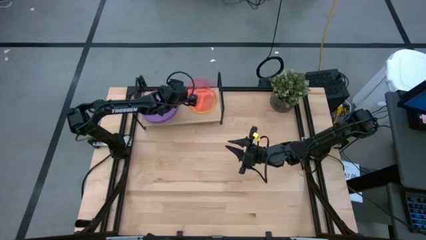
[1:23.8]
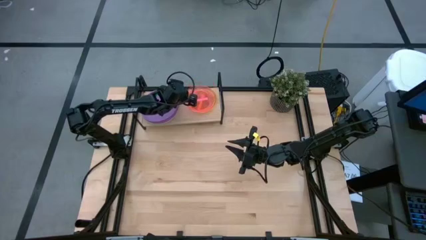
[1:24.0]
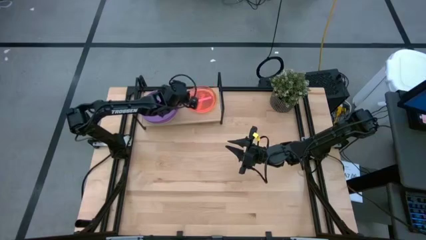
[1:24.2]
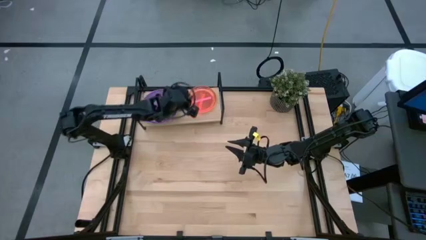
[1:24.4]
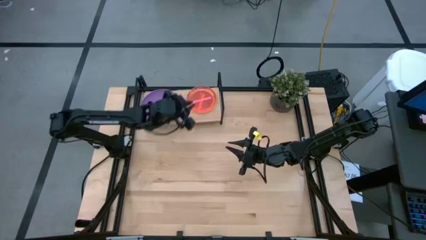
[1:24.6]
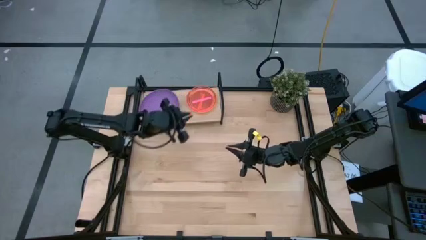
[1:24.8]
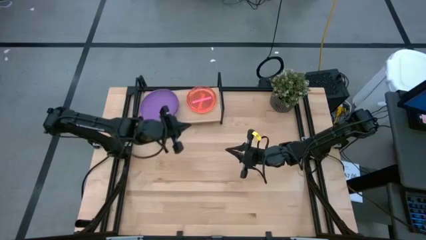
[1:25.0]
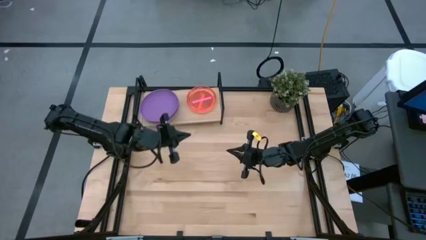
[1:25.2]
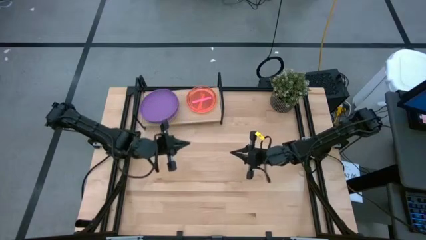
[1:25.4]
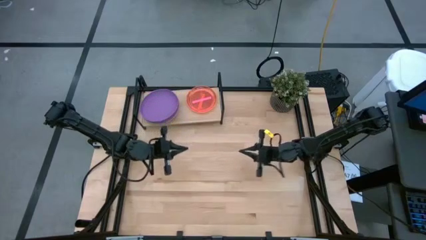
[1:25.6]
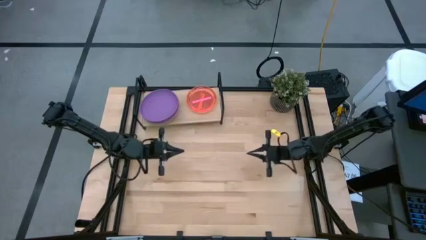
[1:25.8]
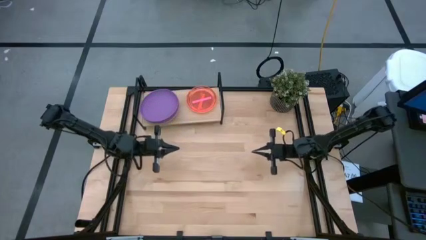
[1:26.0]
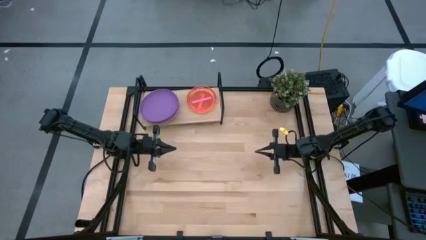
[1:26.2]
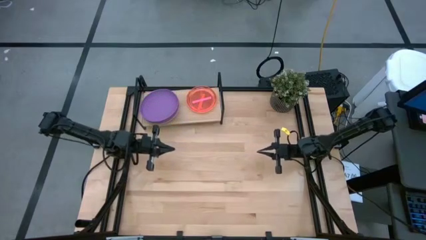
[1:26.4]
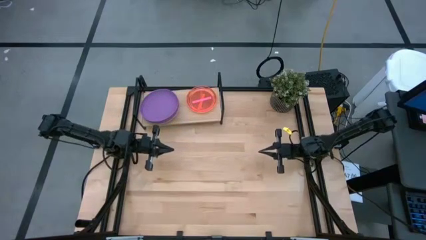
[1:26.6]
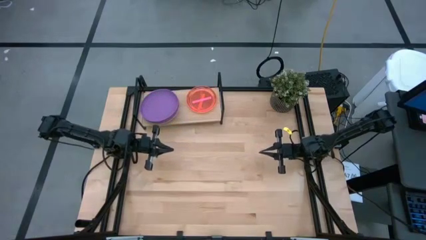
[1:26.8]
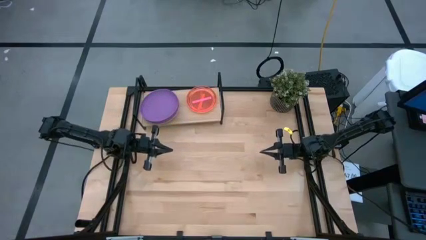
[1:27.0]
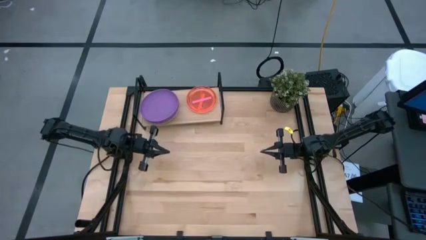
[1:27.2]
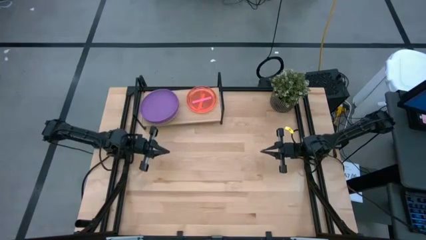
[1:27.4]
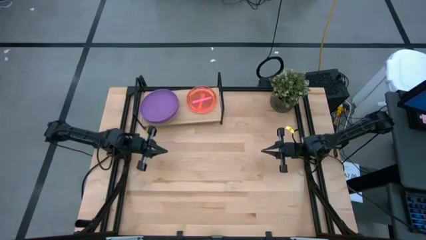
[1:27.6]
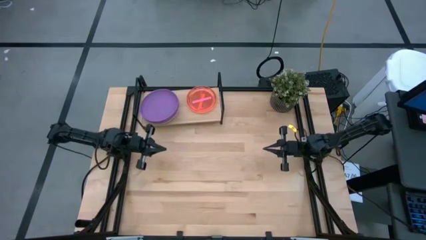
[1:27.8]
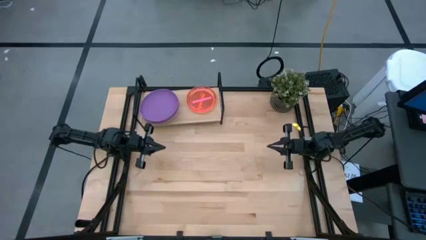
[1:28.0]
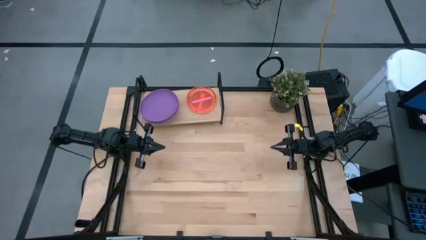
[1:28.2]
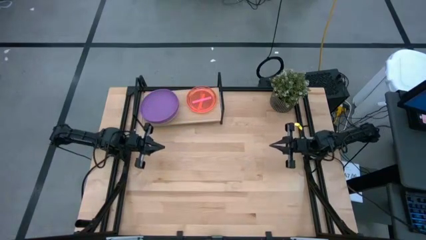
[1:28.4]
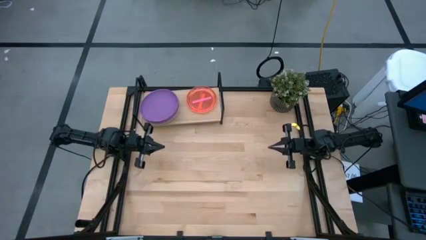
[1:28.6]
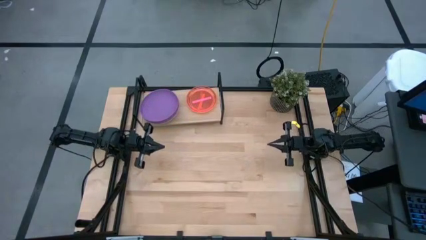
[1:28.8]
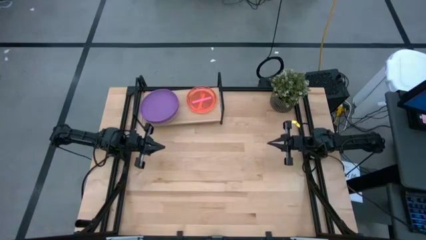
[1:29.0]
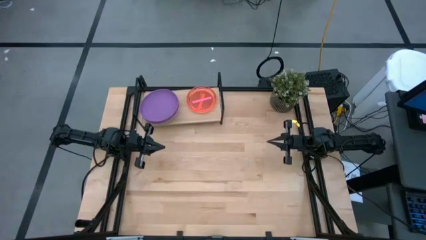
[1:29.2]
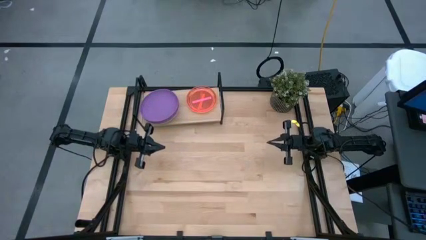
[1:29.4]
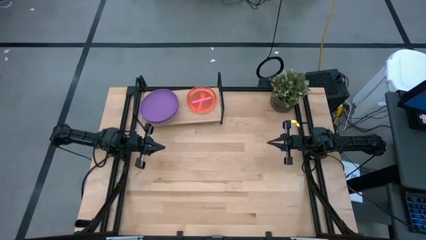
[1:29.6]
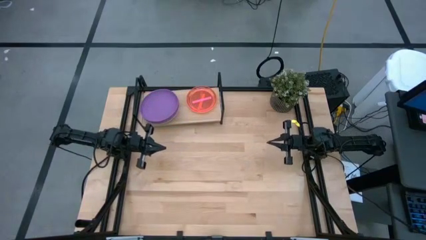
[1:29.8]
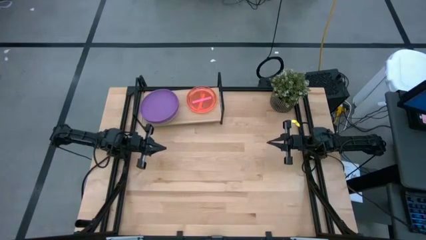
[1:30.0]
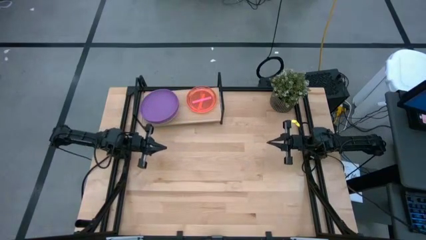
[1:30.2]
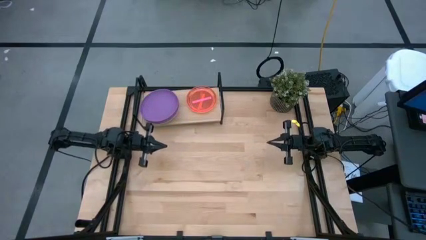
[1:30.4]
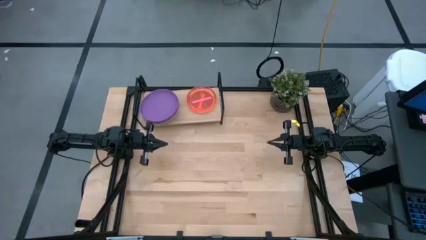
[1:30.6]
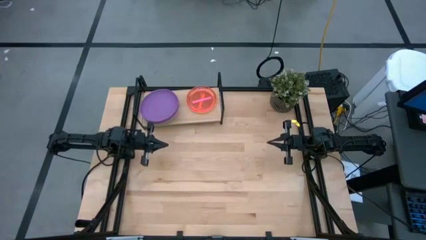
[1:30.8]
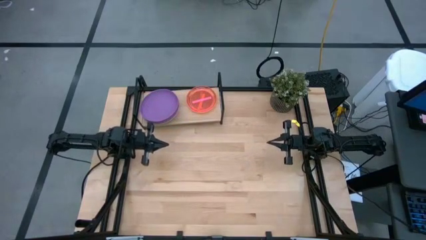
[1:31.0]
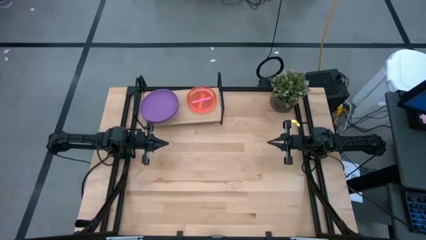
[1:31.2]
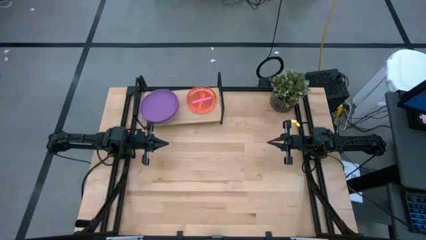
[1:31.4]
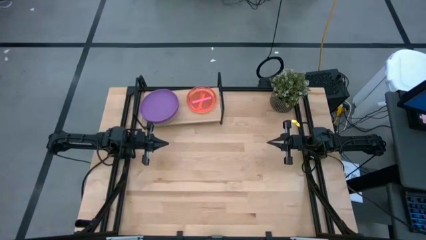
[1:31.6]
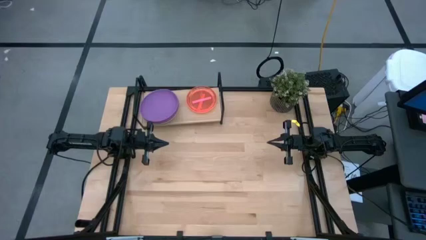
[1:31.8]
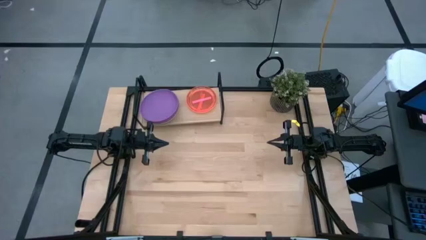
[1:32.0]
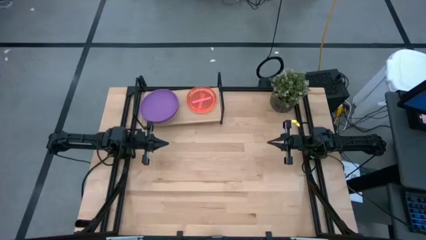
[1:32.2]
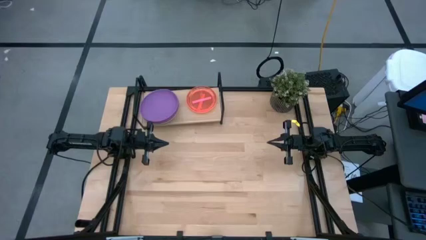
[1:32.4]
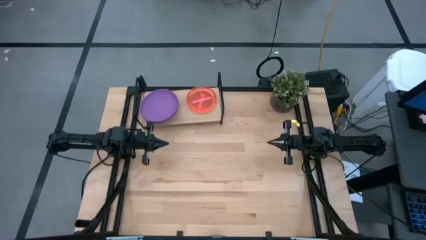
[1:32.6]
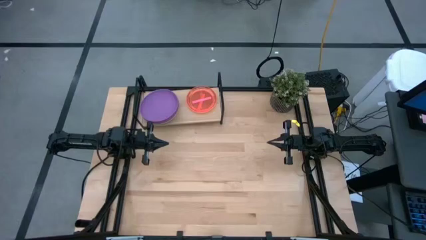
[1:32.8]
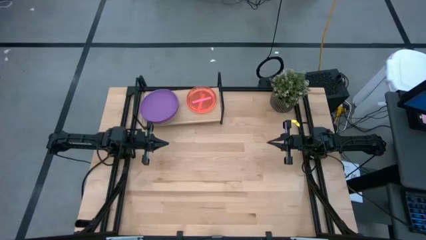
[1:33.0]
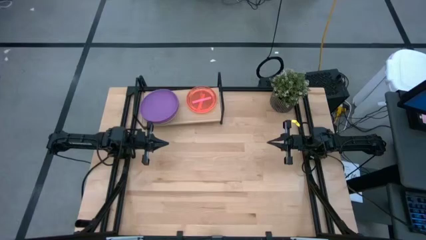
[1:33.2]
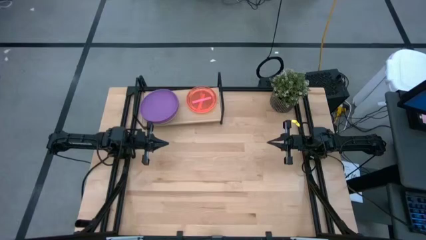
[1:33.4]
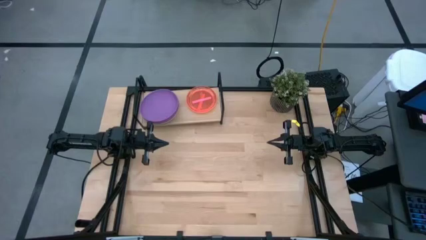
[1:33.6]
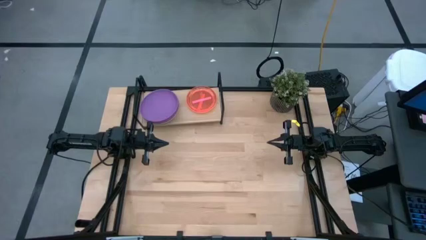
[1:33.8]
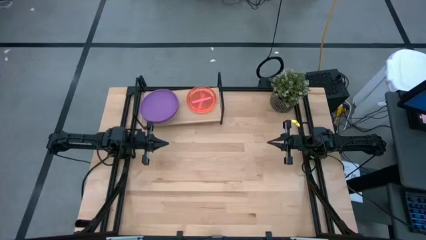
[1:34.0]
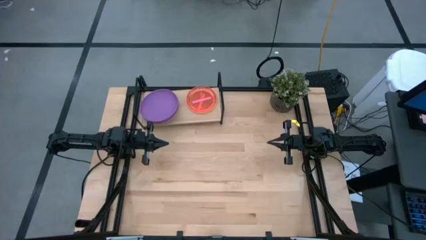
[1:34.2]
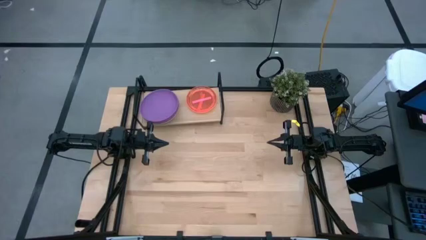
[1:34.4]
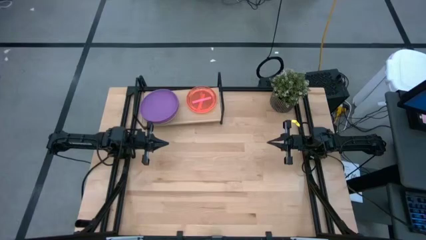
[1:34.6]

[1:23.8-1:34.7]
Task: Place and stack plates onto a shelf
Return to Home Position

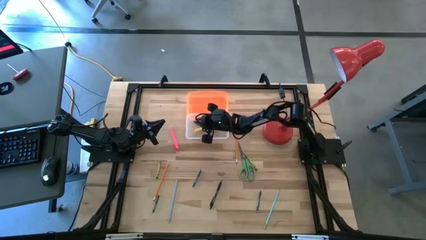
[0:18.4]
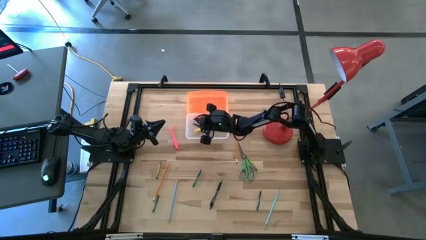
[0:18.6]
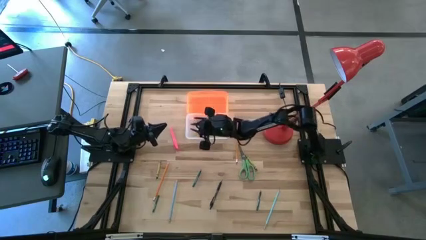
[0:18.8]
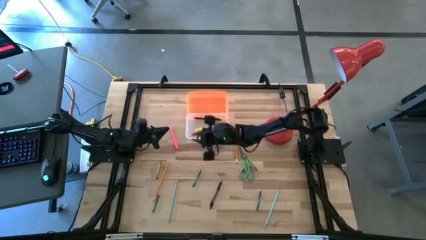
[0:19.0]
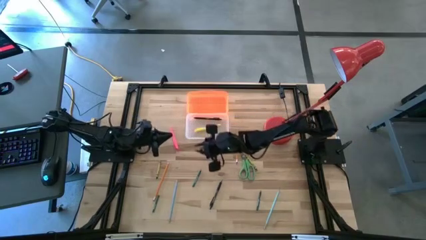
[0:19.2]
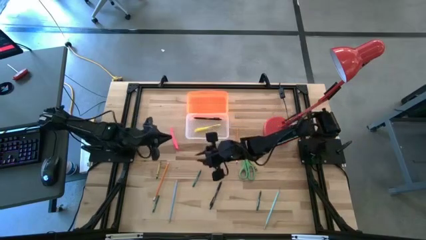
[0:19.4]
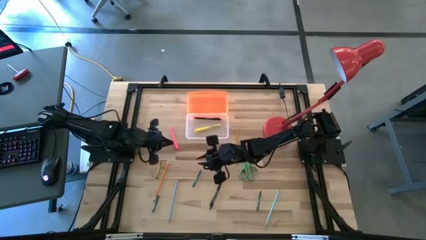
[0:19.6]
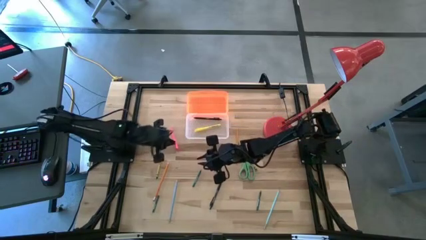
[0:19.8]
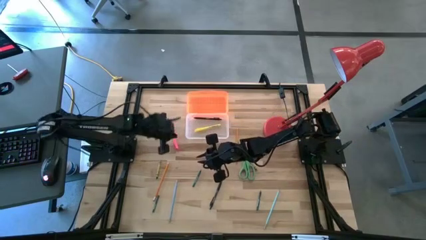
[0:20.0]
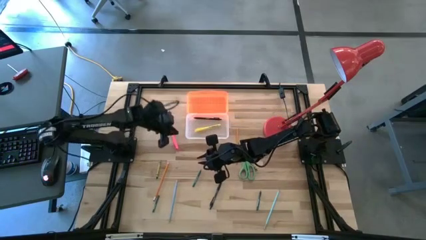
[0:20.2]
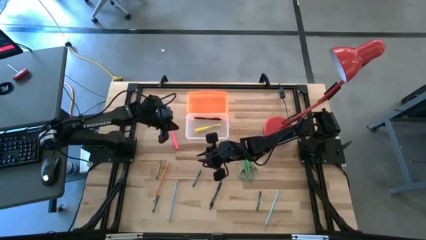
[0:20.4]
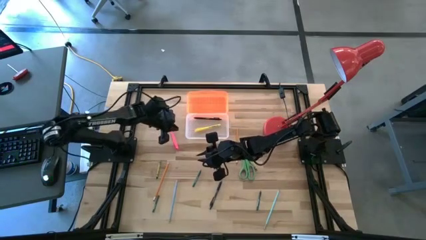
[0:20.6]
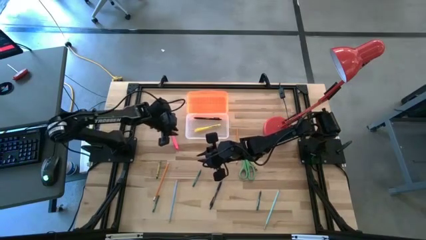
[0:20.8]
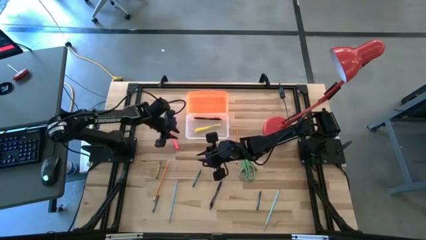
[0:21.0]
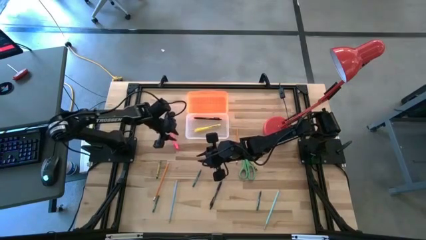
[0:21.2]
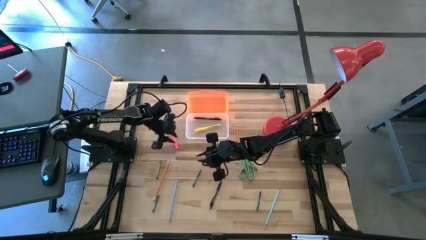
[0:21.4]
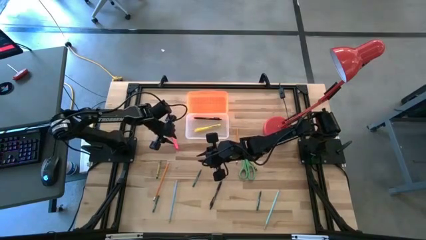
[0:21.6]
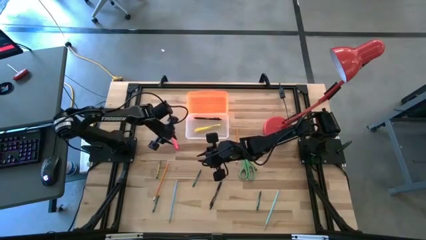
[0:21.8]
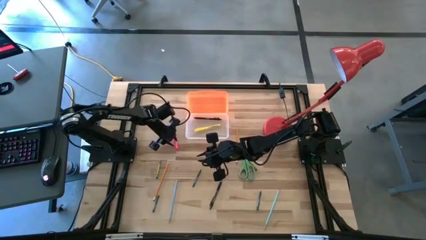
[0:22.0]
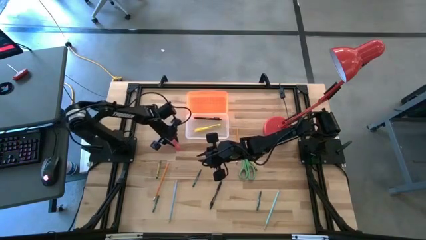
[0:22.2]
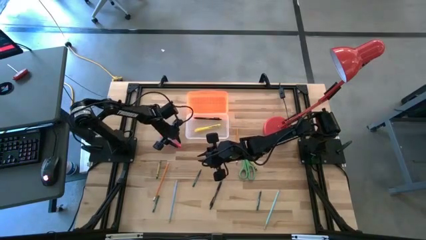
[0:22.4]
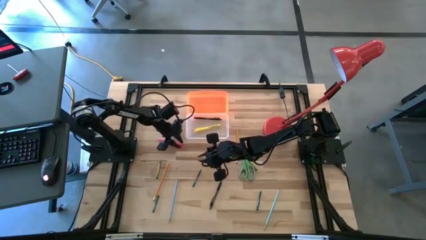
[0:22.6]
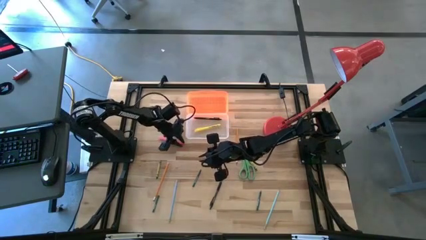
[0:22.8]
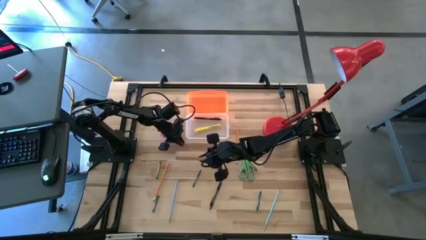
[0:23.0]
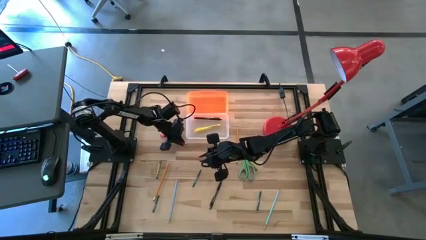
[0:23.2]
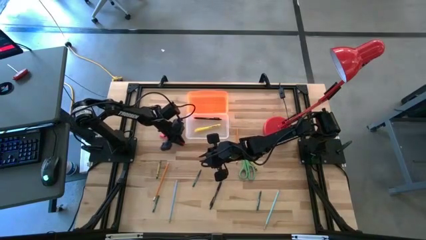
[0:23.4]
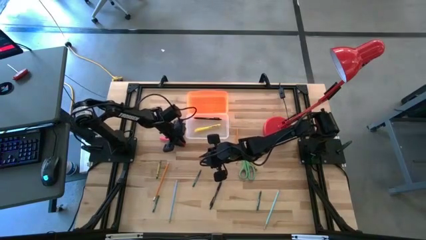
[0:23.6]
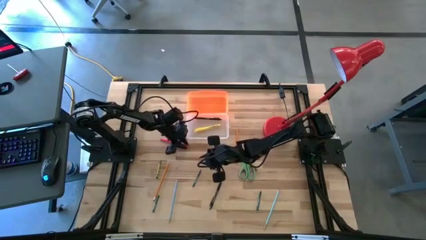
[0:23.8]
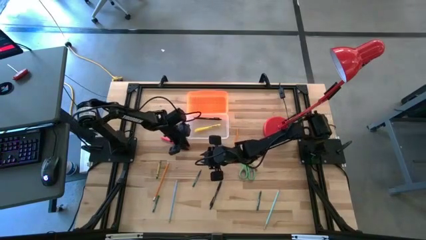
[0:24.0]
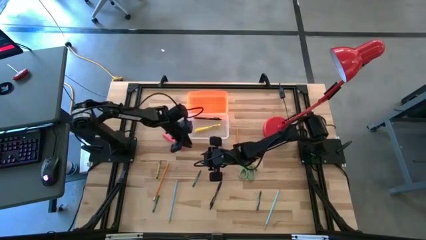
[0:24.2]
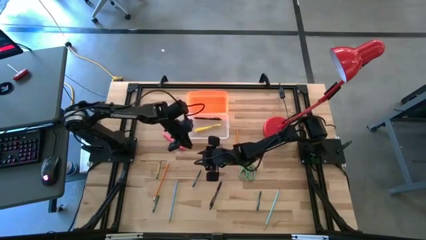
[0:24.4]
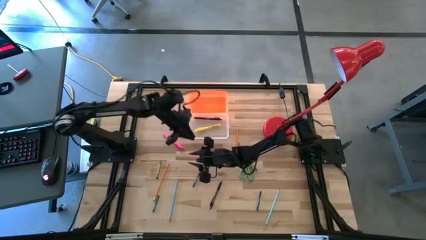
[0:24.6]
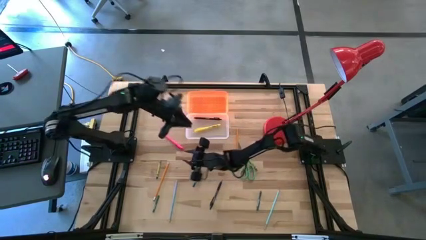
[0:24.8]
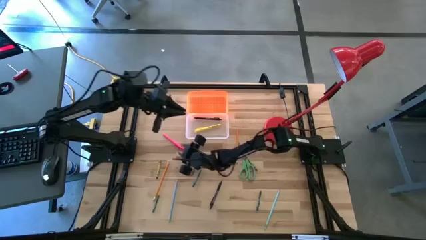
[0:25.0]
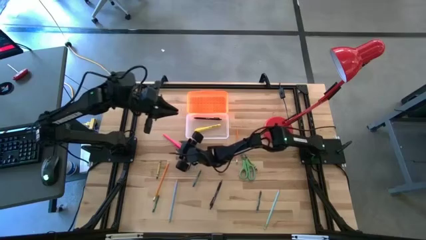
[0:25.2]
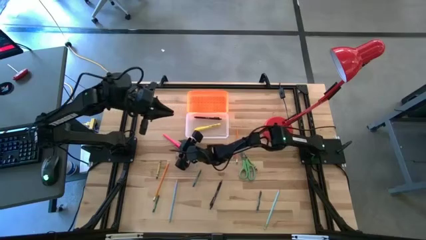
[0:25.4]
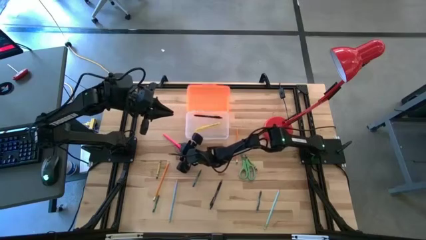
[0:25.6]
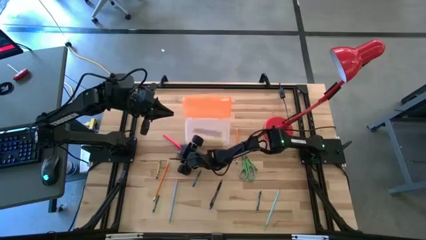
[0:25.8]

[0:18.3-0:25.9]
Task: Pick & place school supplies into a supply box
Put the pink pen into the orange supply box
